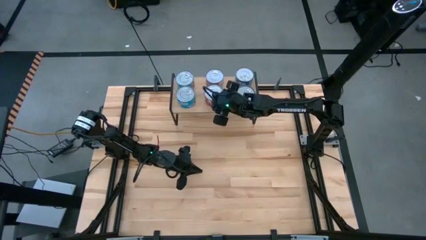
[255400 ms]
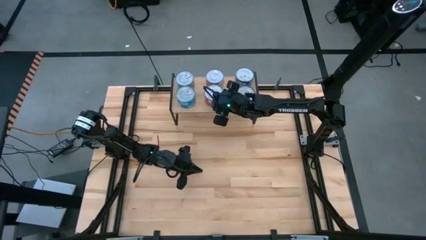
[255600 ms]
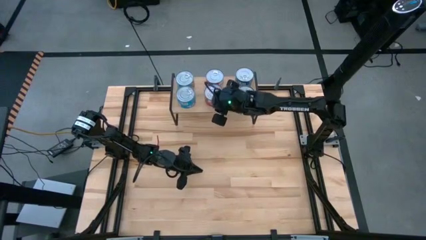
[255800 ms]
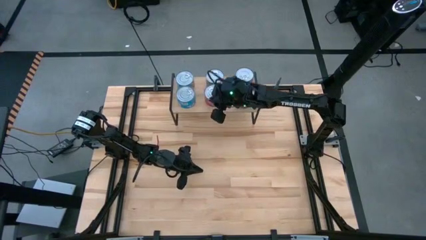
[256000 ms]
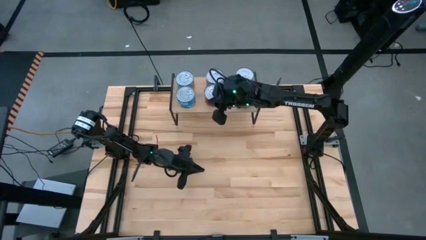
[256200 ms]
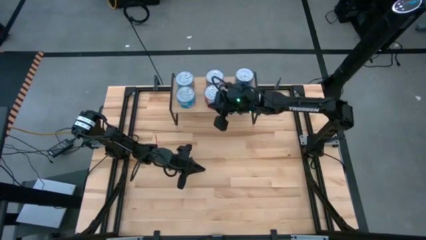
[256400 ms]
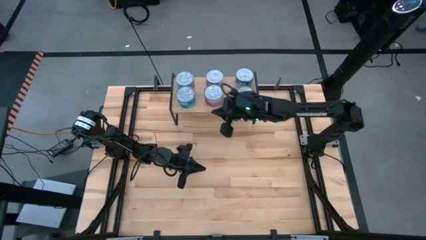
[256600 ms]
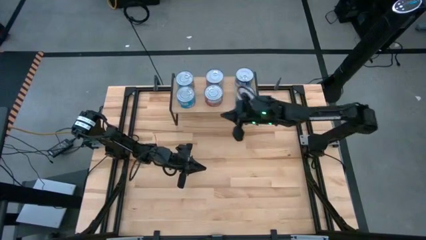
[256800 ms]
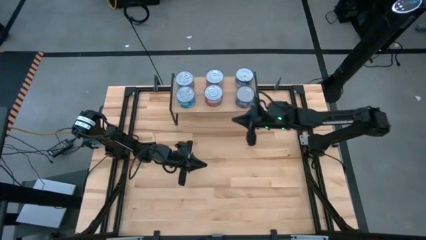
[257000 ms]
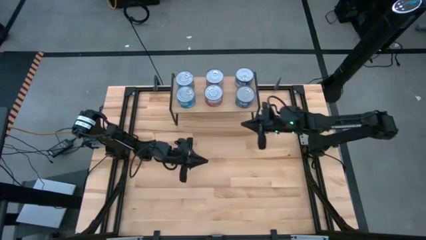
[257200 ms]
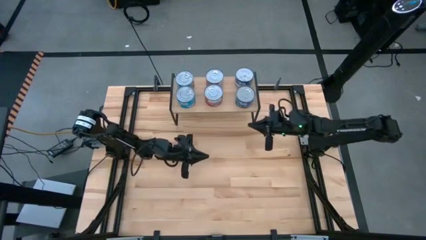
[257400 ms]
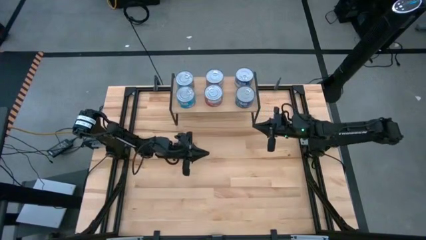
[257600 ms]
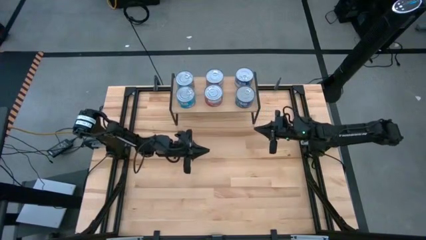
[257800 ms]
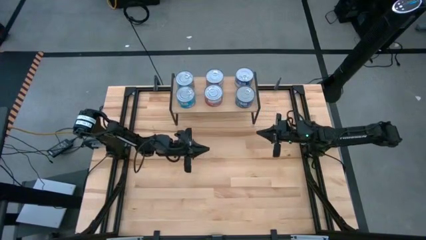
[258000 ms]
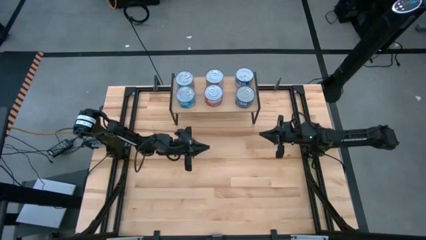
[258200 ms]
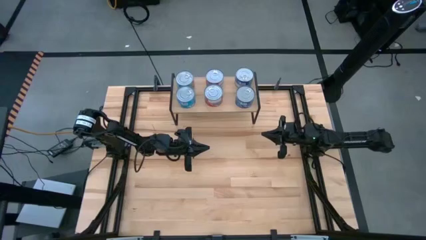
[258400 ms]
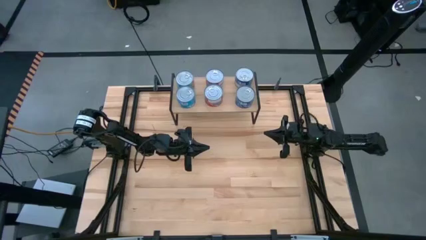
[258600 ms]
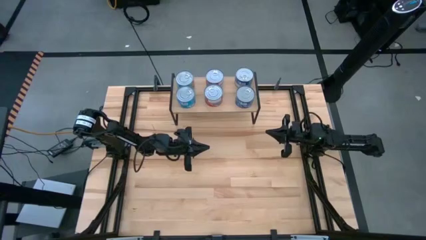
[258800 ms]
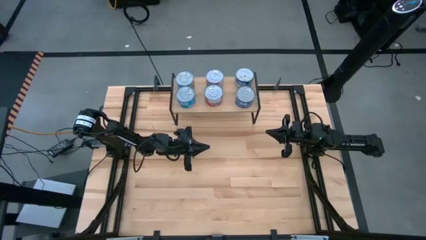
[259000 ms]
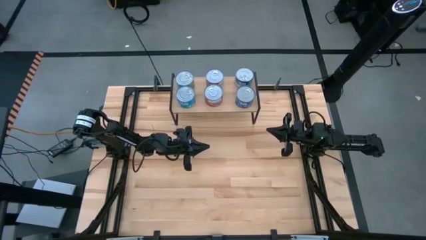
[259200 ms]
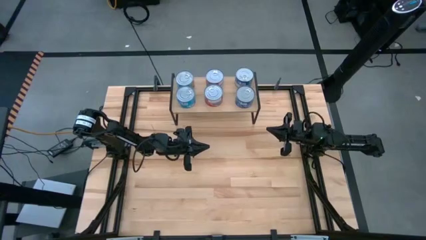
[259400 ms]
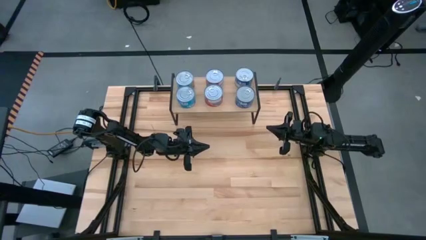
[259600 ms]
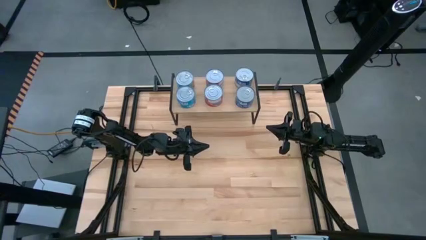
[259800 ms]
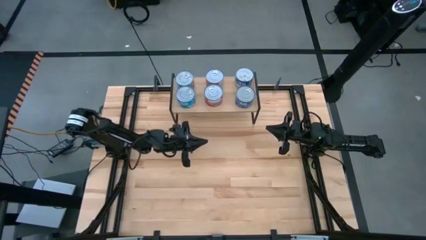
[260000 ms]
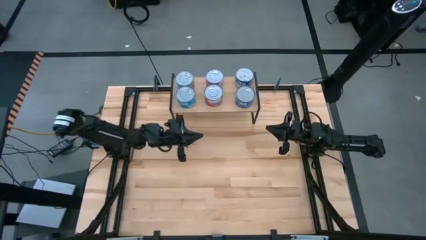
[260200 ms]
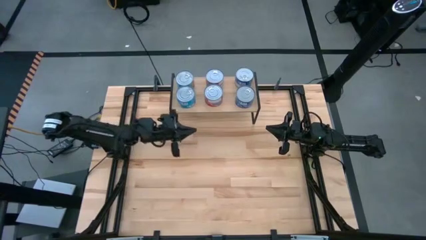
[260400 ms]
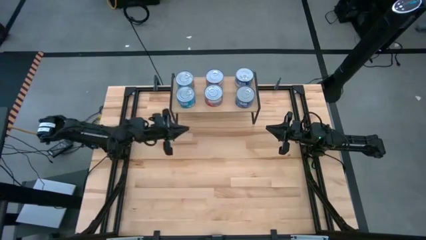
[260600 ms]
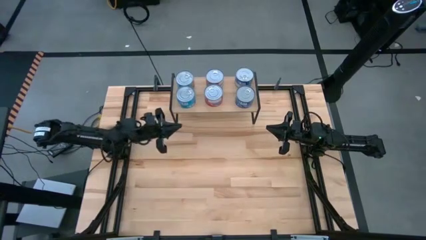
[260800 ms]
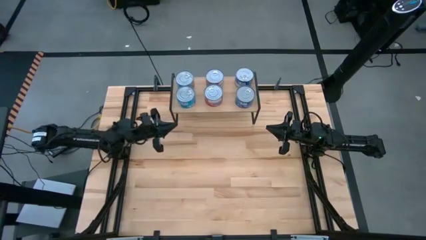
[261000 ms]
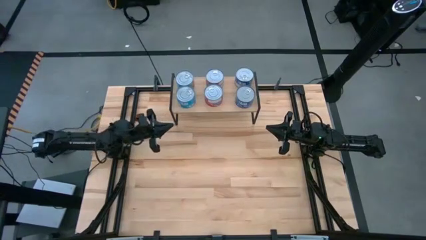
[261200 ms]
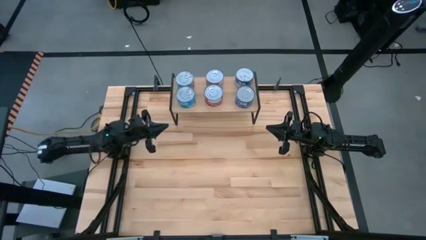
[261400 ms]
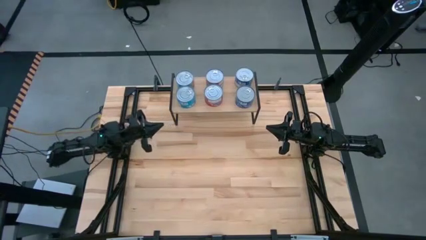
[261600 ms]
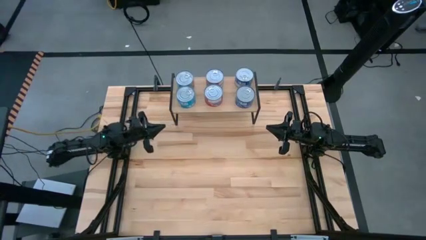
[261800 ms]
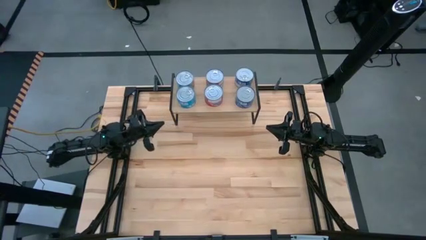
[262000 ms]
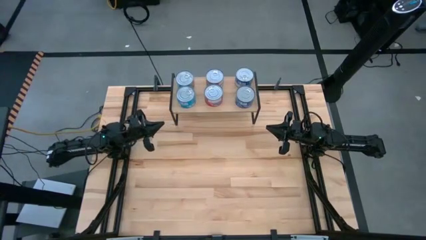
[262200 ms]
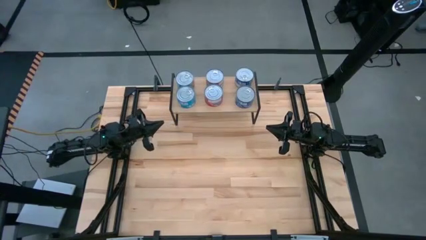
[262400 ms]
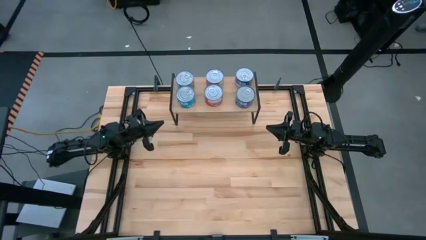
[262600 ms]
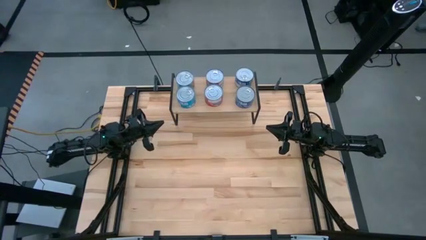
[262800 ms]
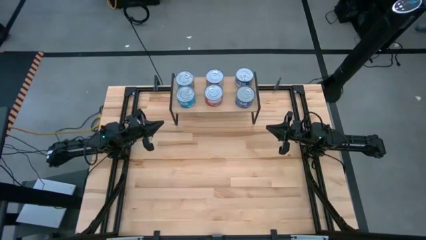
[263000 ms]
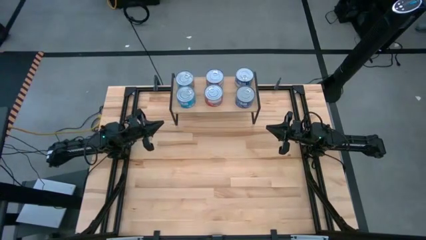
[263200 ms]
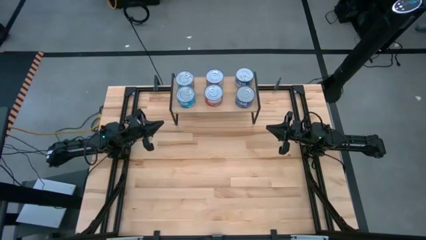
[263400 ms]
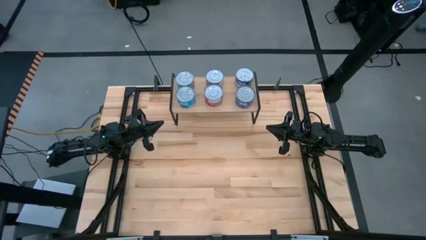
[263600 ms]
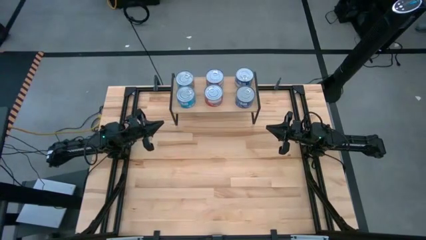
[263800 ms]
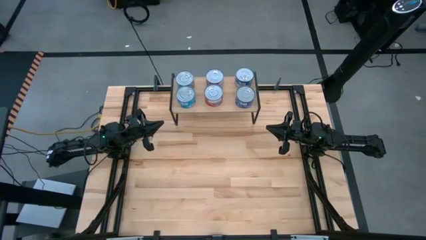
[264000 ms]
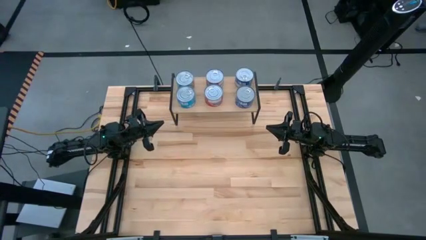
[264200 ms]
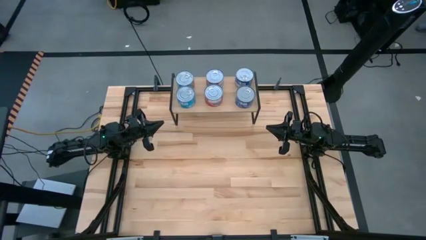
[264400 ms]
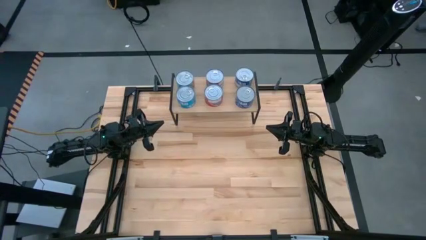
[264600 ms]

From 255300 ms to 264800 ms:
Task: Stack canned seafood by type on shelf
Return to Home Position

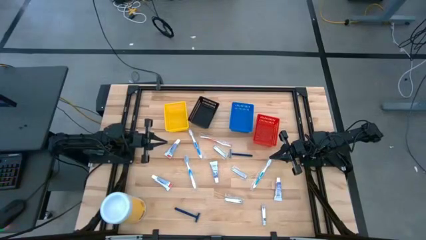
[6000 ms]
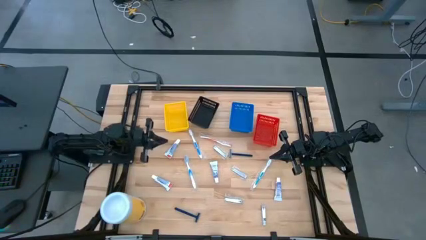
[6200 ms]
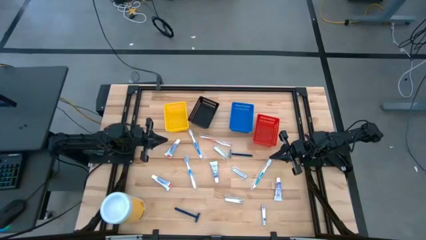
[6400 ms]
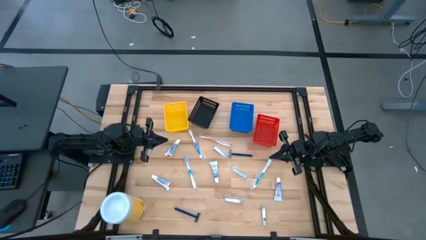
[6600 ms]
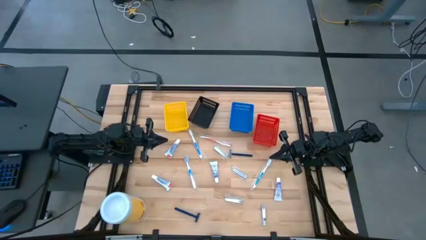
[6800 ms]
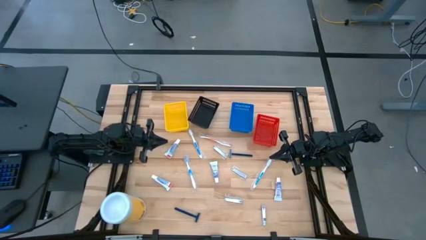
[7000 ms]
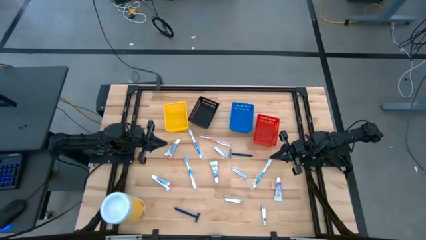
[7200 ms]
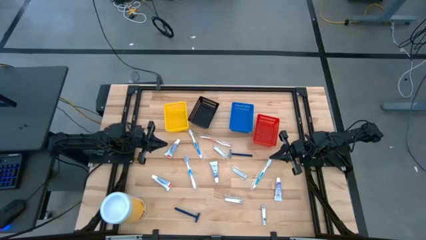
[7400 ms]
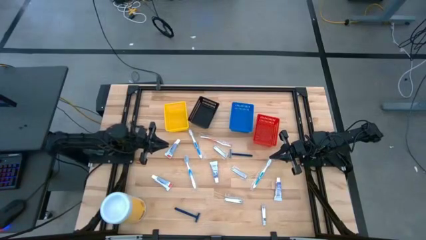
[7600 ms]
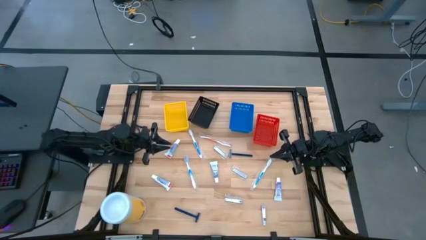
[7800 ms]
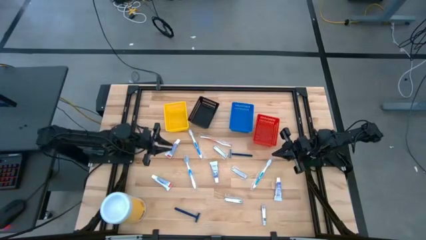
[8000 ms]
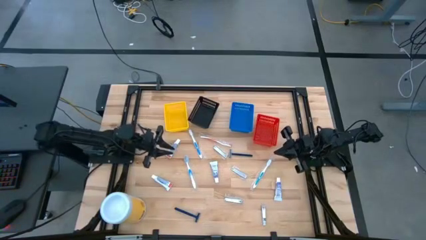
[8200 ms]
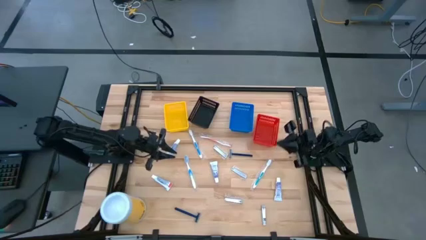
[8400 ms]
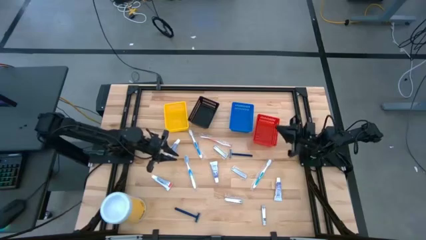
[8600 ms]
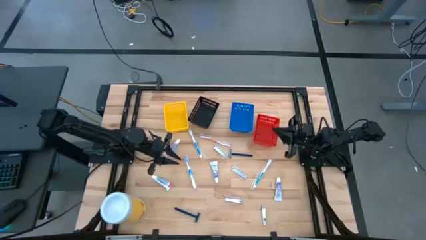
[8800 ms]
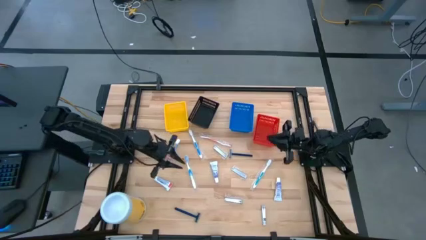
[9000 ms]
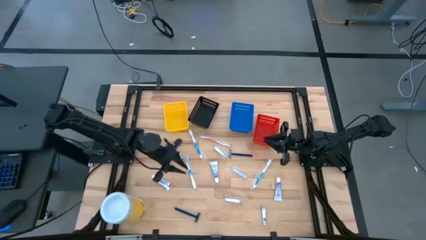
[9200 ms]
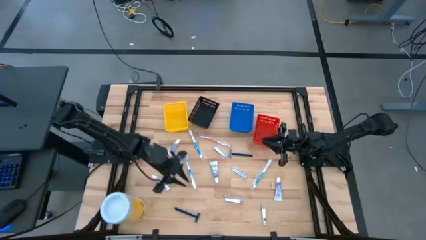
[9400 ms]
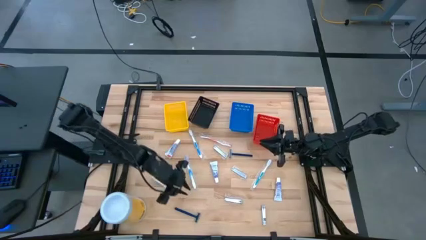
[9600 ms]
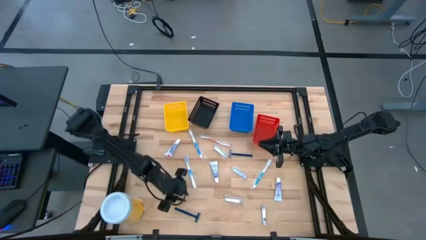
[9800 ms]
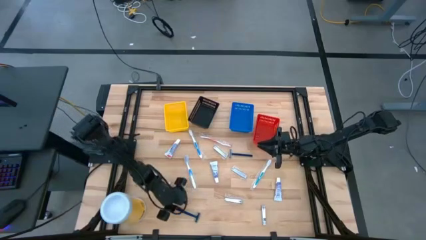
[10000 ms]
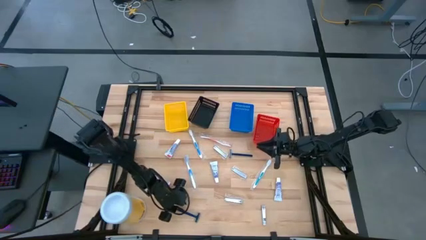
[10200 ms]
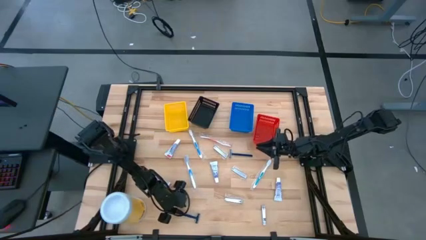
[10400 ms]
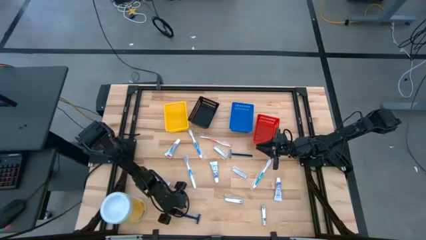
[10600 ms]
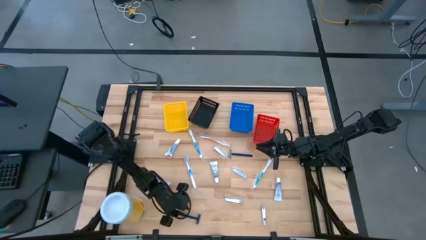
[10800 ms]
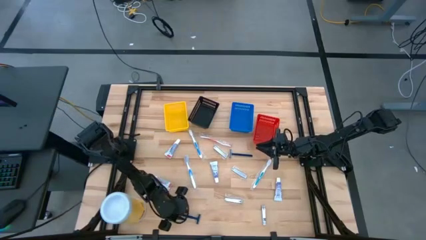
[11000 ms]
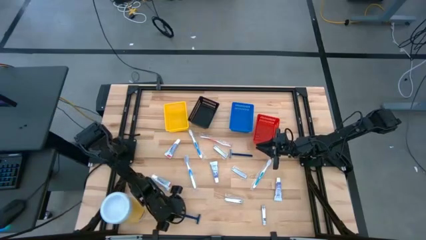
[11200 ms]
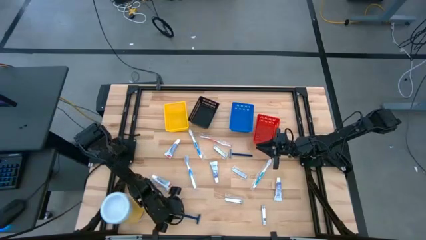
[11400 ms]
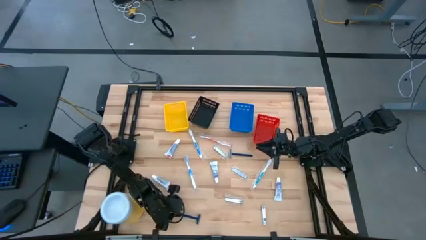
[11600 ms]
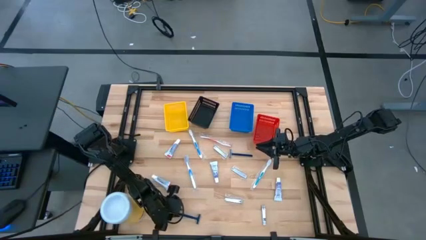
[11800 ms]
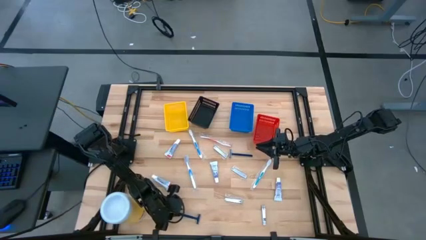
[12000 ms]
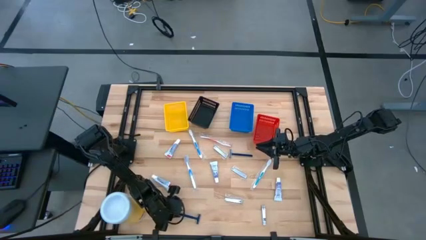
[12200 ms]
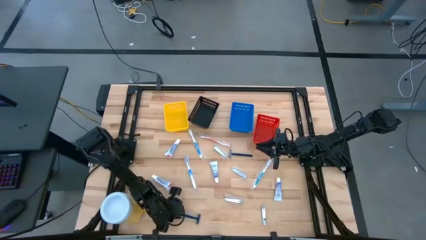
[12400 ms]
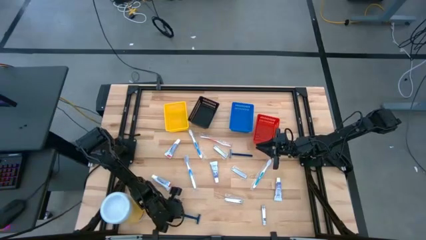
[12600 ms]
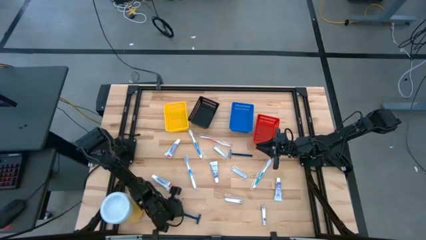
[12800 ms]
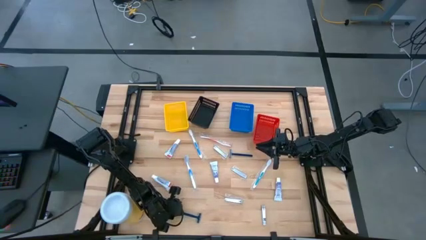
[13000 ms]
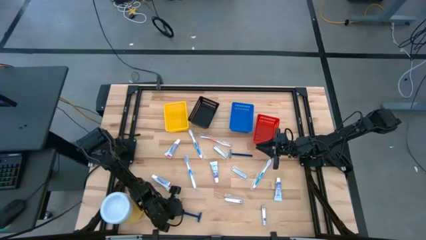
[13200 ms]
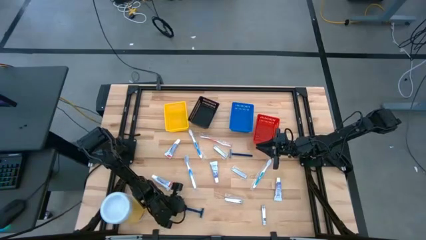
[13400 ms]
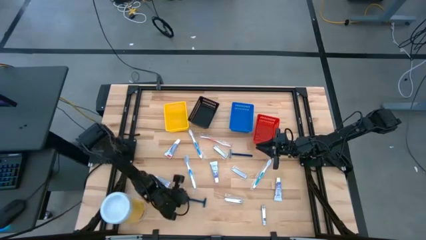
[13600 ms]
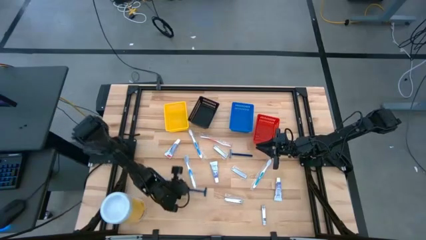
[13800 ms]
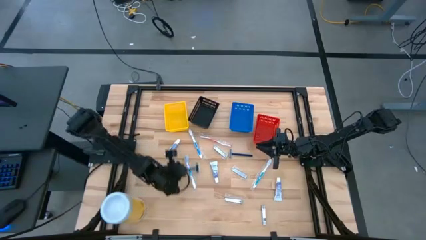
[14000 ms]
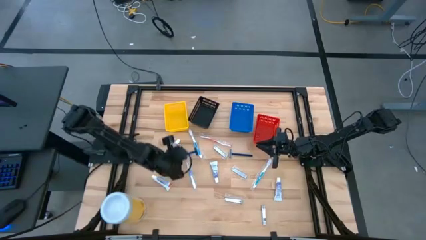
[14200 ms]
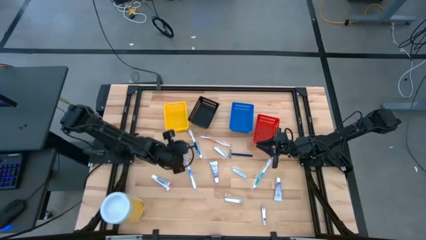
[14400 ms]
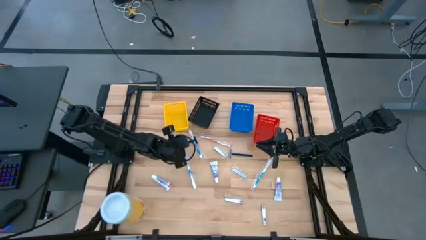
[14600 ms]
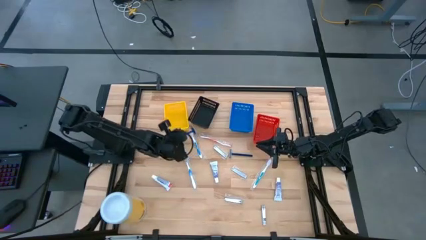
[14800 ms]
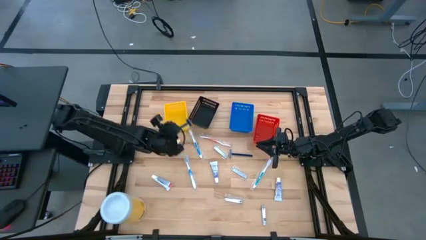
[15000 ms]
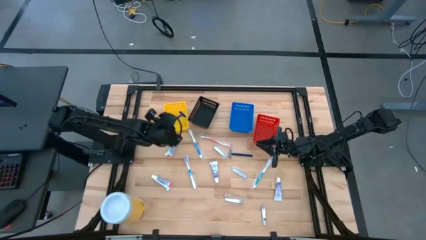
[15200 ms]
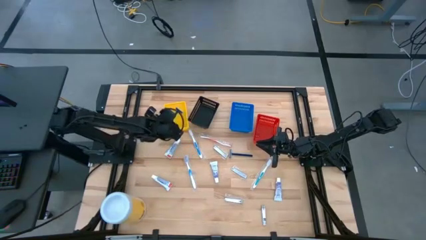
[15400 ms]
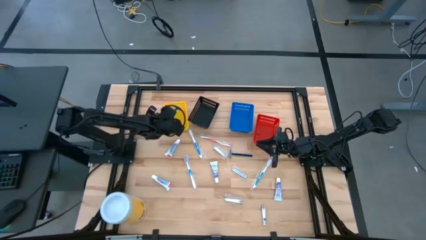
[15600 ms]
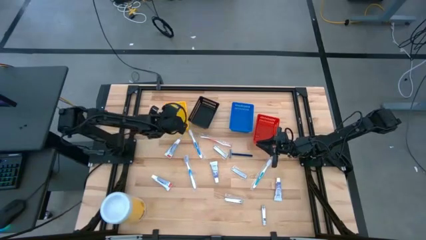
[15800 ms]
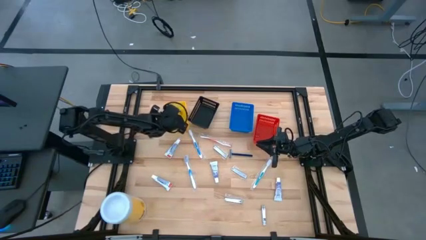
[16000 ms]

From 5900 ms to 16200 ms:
Task: Pick & Place Travel size toiletries
Put the blue razor into the yellow bin
